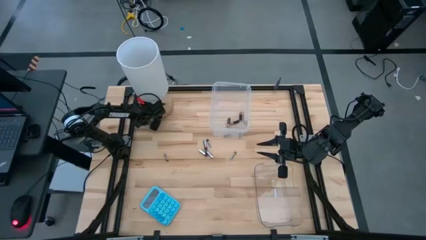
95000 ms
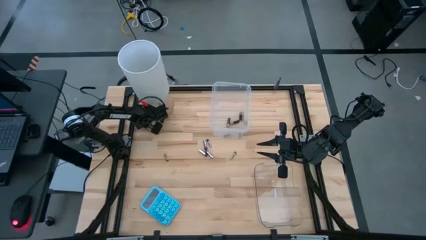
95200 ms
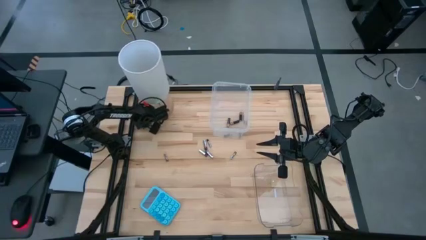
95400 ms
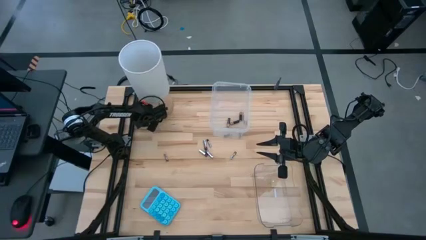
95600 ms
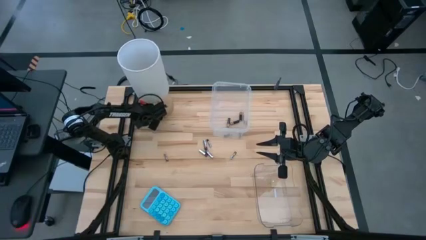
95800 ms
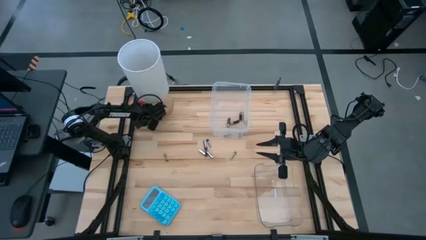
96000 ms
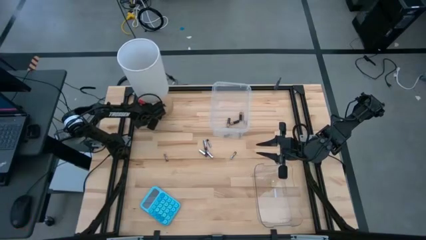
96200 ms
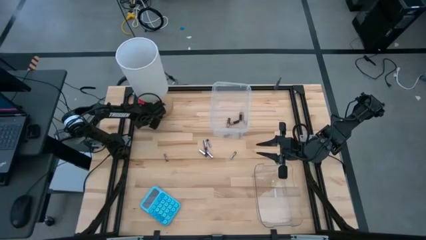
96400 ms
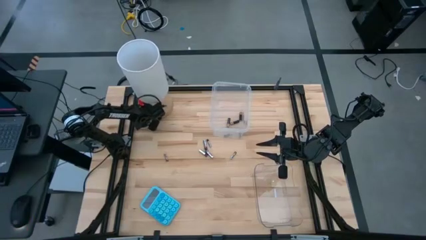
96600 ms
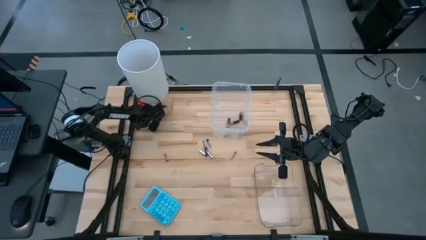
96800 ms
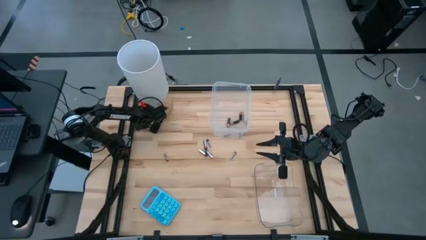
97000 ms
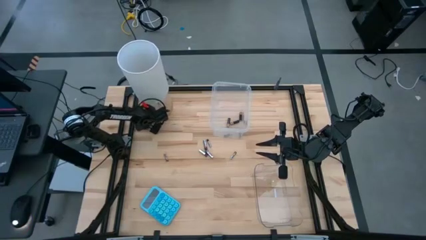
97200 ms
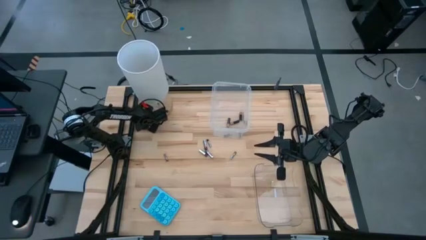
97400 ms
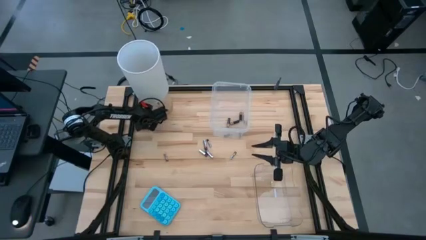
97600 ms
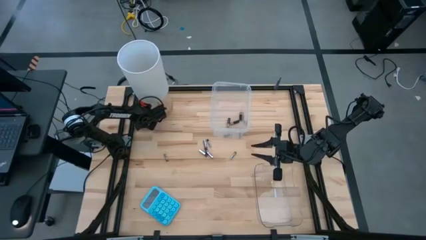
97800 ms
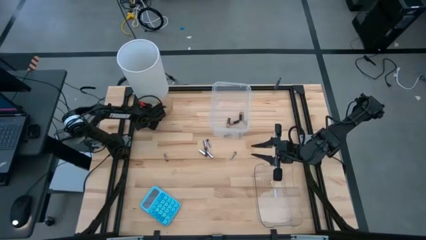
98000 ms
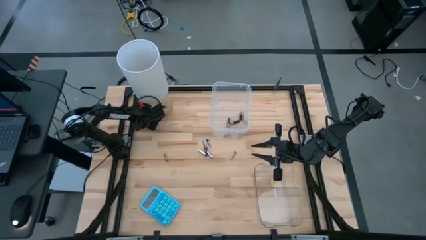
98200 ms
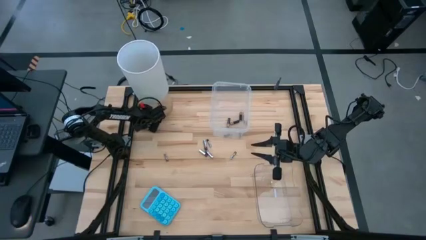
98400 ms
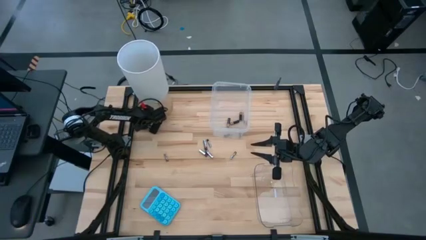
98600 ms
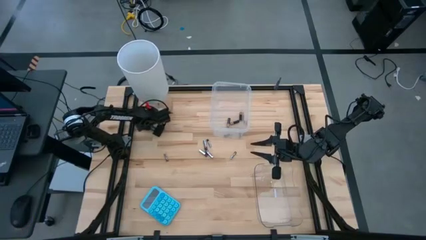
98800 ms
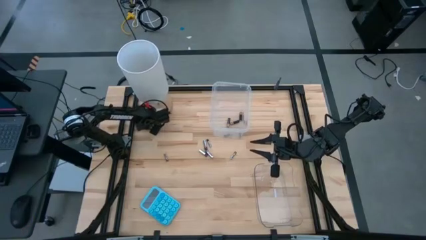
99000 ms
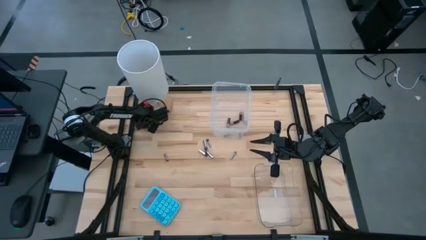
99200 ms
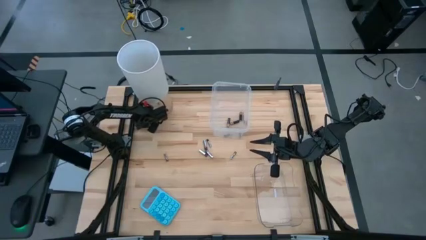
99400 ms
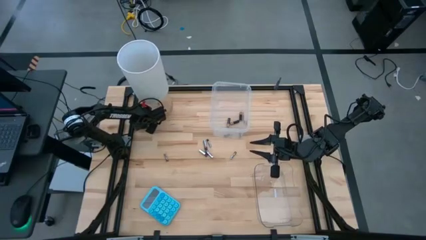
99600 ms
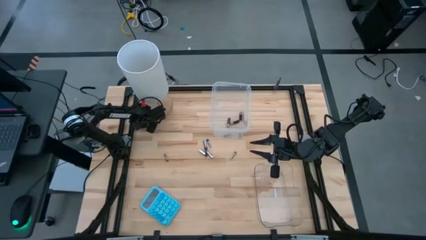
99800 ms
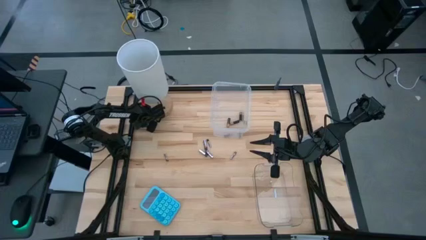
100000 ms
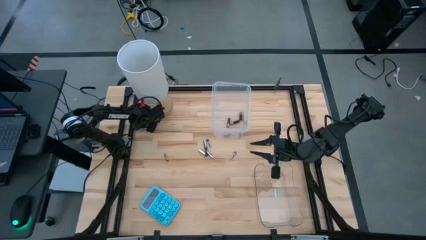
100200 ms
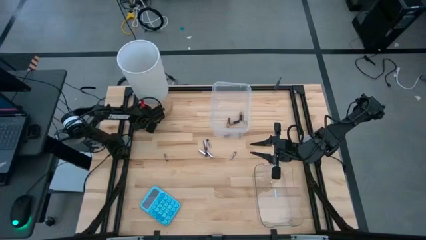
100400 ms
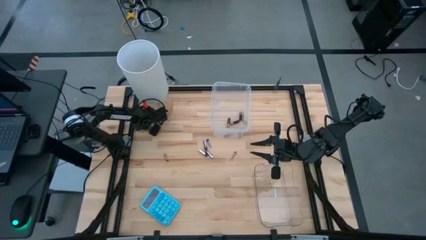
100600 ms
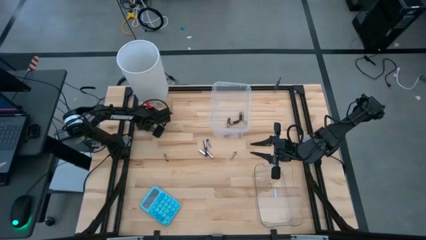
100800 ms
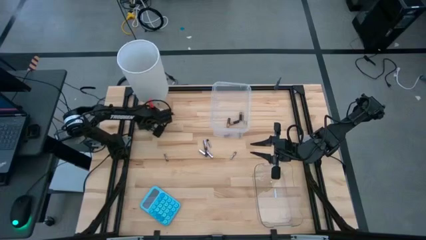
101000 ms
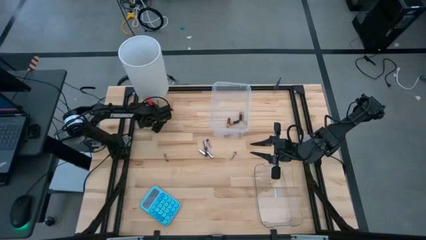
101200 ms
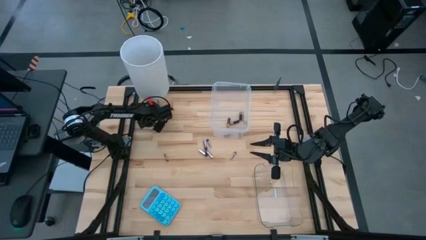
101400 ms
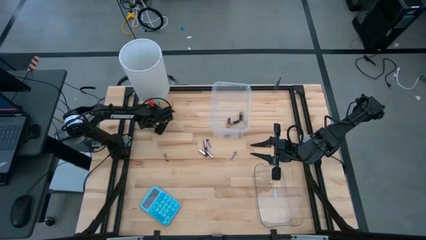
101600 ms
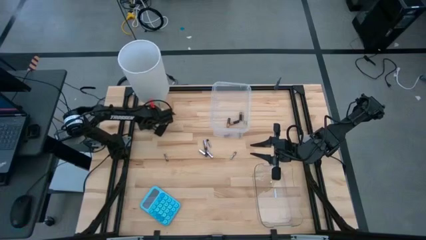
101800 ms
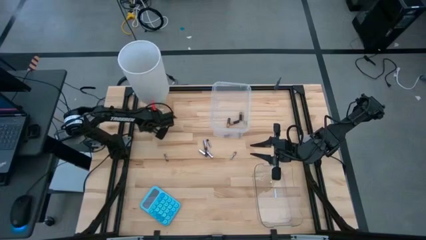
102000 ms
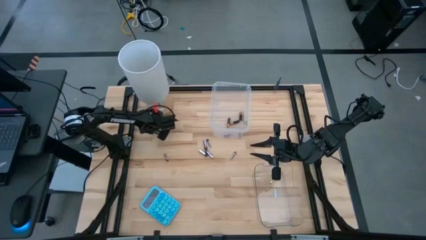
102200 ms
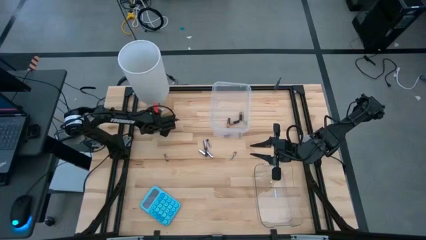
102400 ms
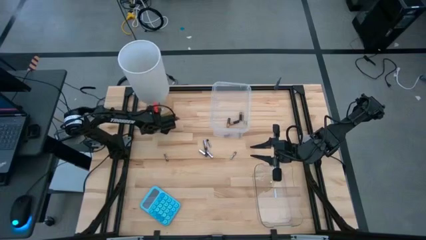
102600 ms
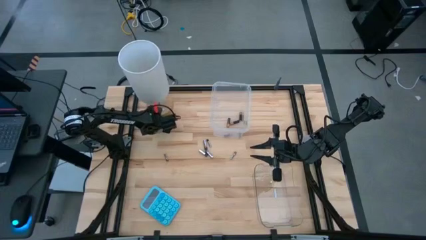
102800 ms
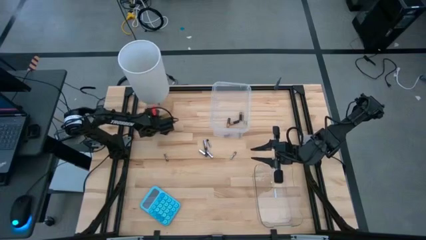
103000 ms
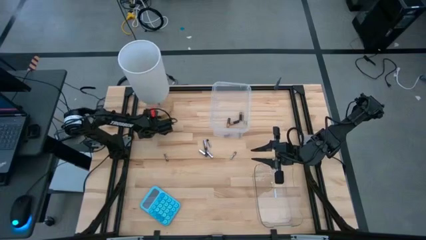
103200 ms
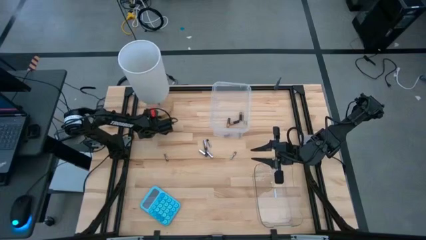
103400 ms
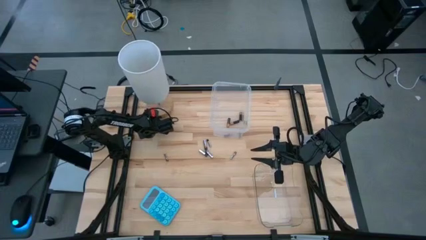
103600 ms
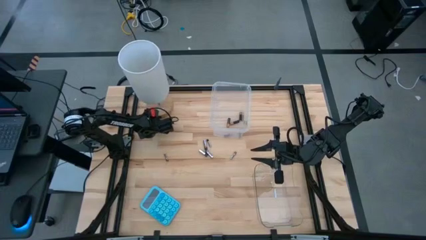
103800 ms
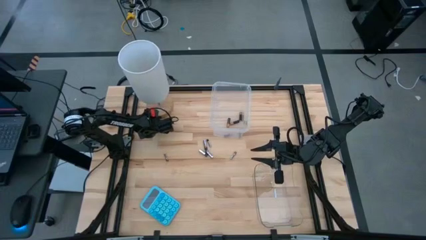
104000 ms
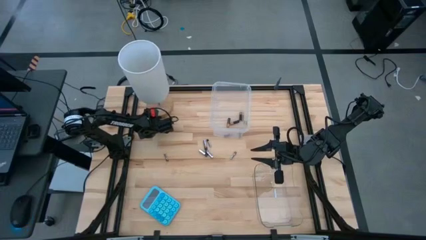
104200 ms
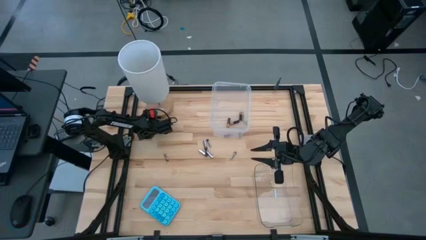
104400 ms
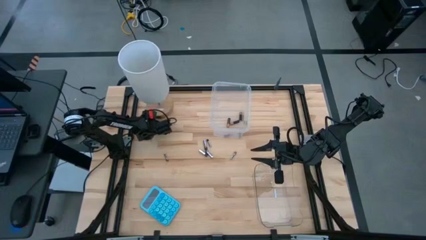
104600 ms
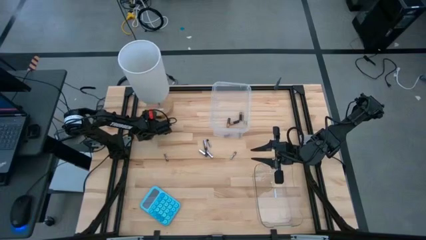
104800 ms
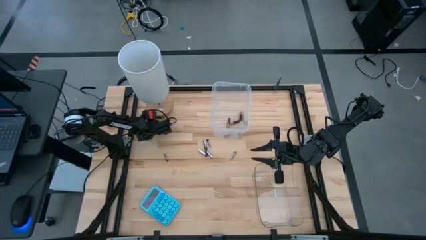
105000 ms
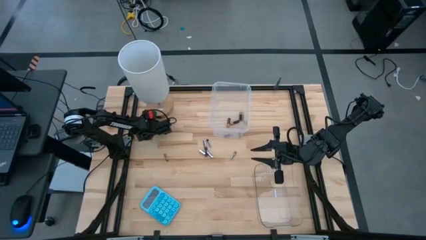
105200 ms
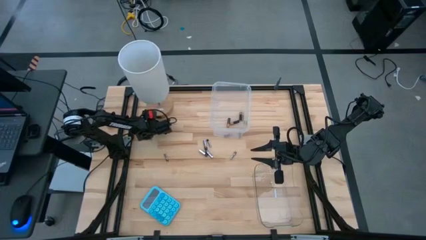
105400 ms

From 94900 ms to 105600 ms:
Task: Sort batteries
Put the brown battery into the top transparent bin

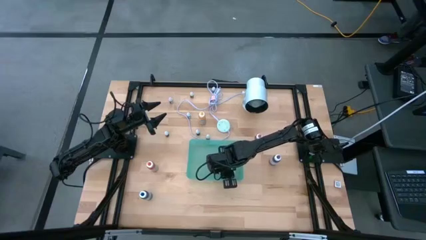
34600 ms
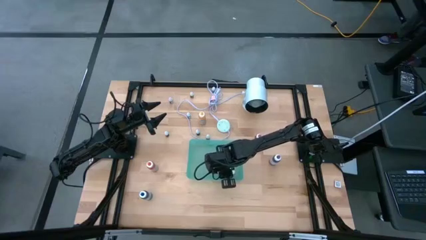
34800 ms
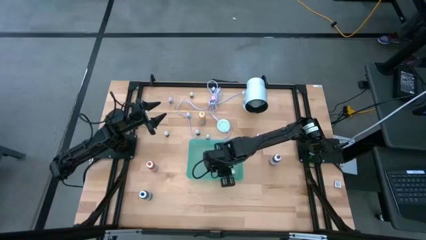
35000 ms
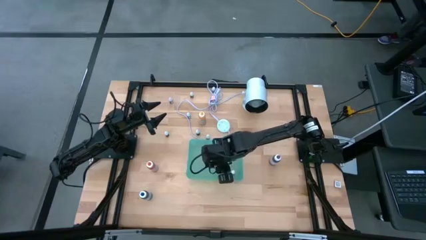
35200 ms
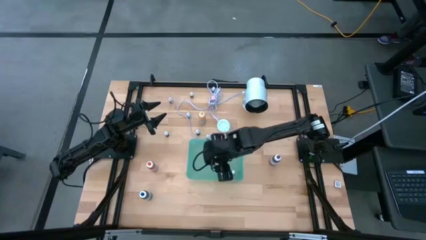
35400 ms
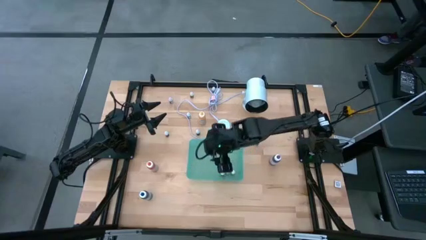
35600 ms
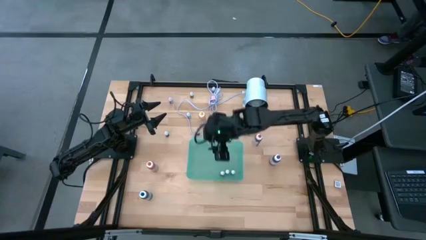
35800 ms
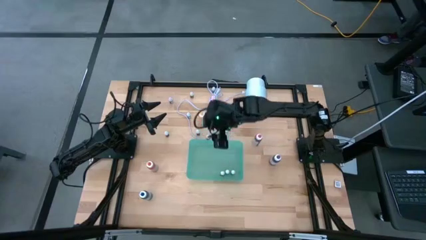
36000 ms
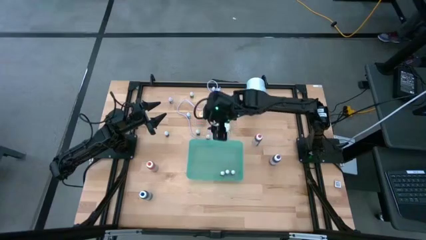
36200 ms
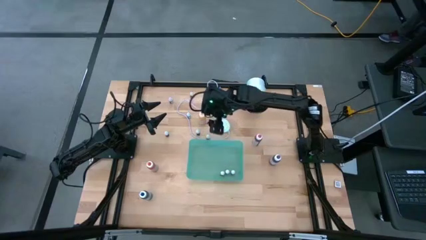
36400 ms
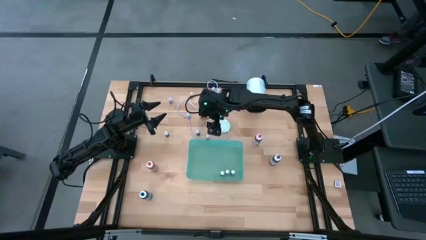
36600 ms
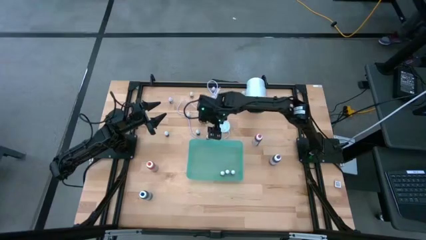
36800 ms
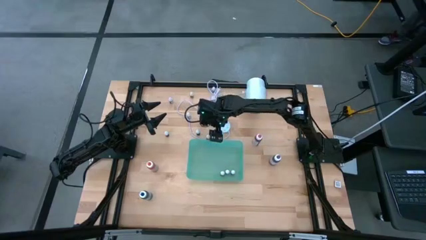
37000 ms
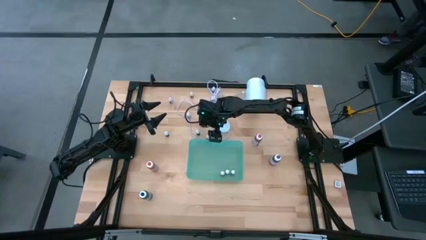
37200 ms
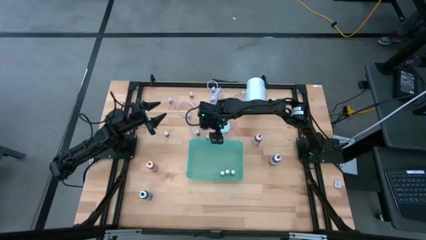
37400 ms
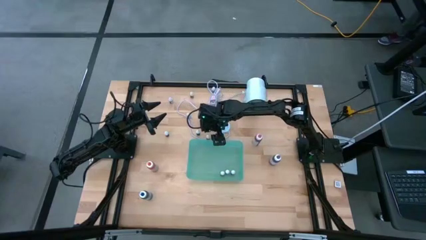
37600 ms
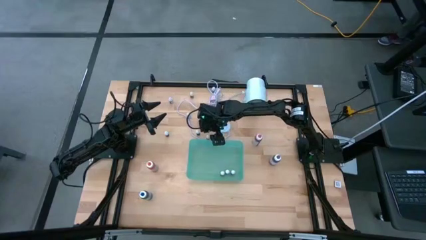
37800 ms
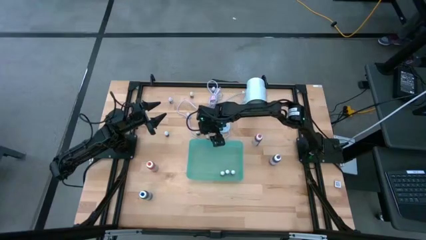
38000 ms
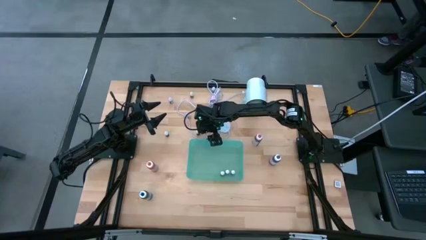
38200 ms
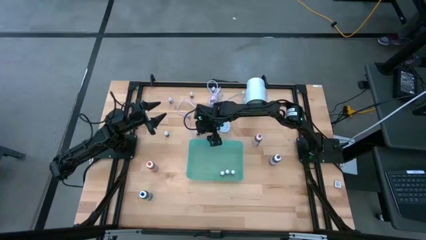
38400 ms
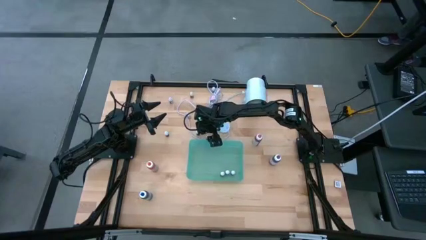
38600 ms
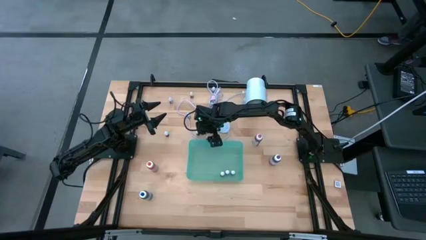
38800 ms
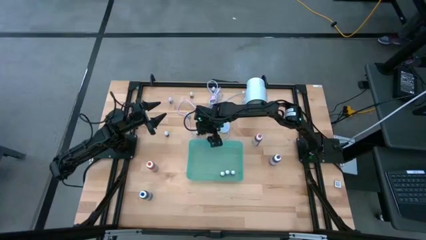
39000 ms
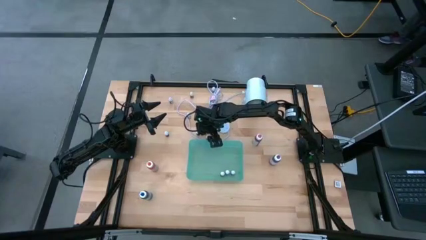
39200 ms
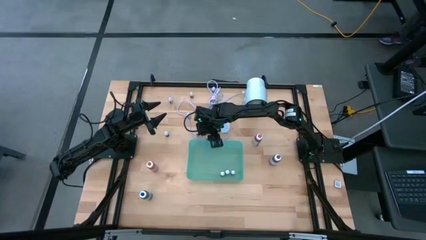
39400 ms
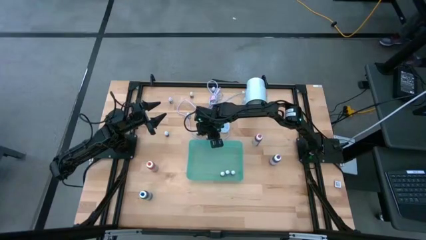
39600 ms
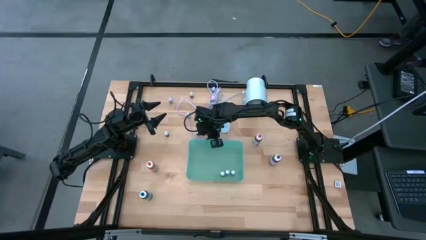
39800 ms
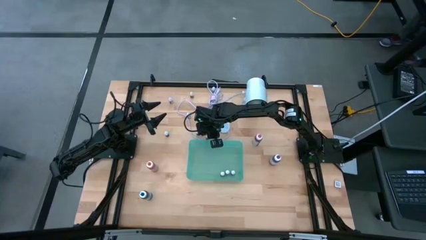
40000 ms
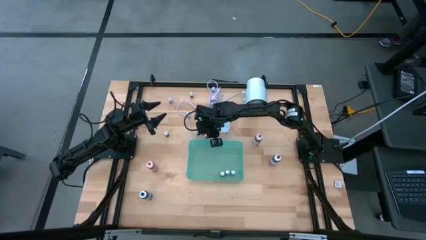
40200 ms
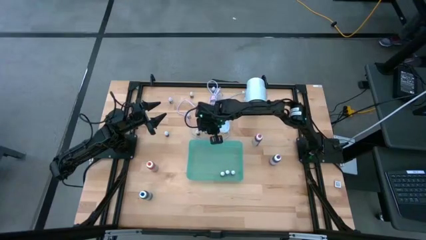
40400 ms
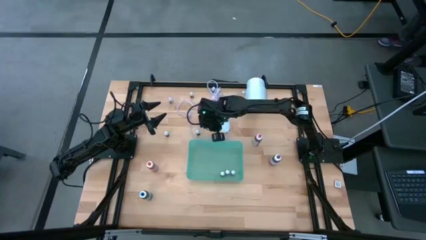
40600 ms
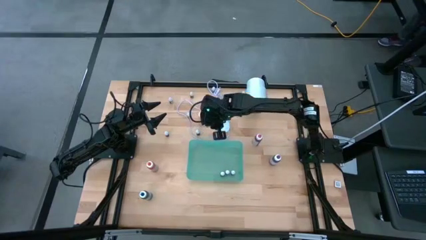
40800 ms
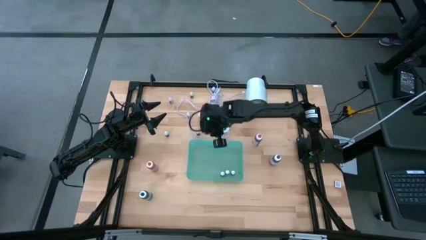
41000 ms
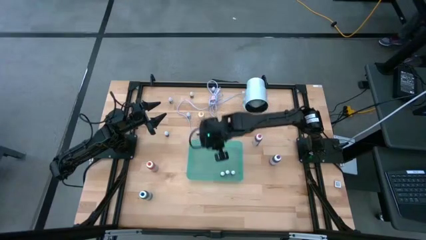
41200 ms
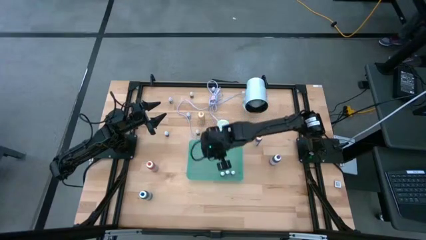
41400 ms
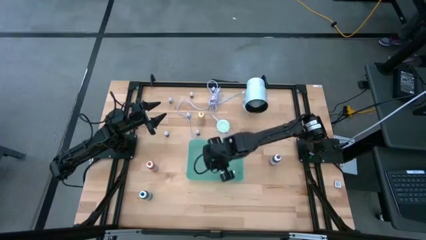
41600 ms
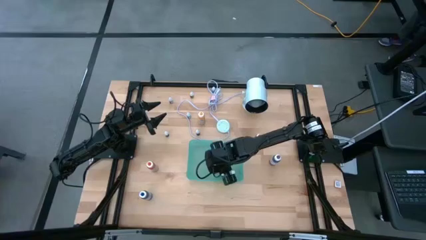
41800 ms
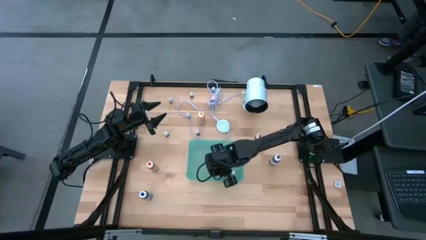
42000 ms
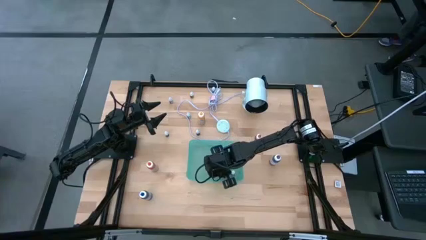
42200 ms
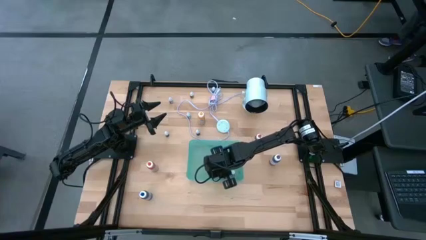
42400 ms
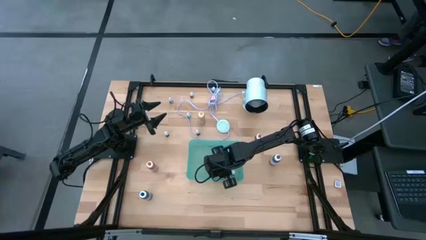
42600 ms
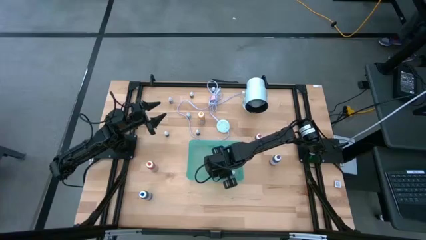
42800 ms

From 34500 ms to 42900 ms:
Task: Pick & Place food coloring
Put the small pink food coloring bottle into the bin
